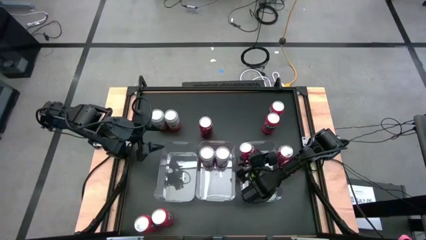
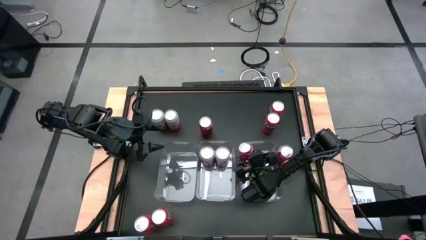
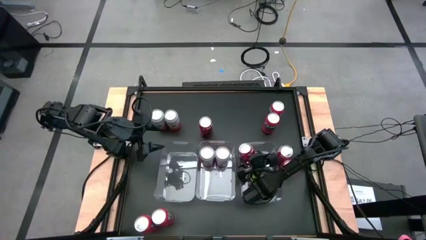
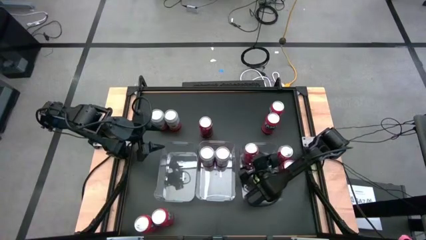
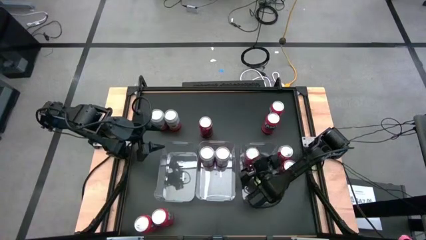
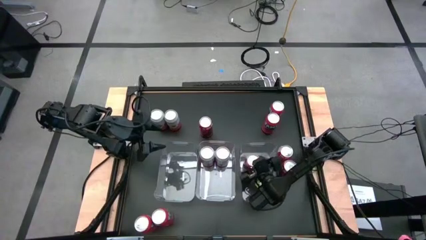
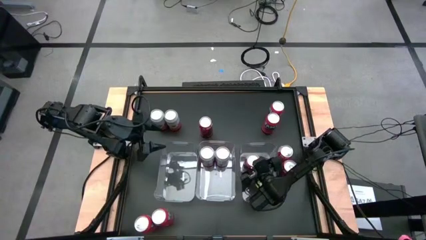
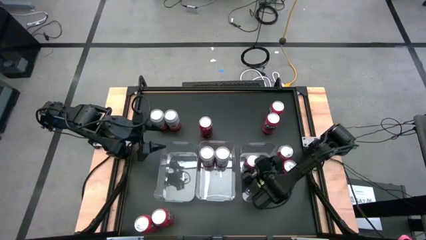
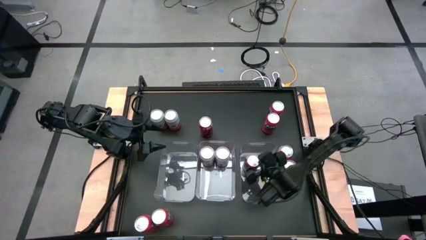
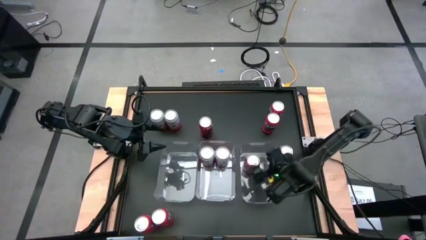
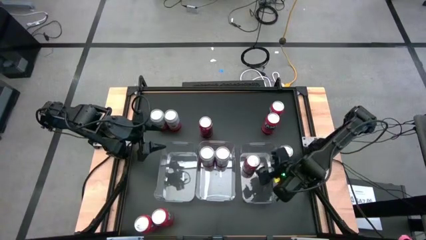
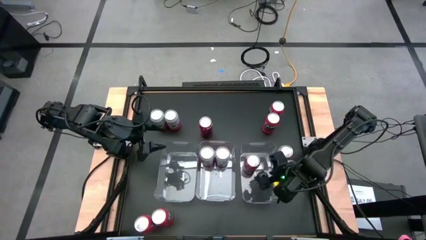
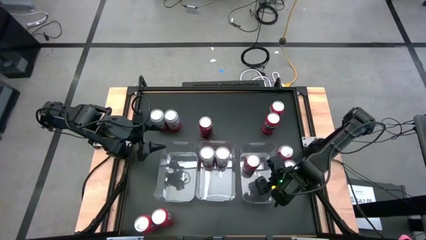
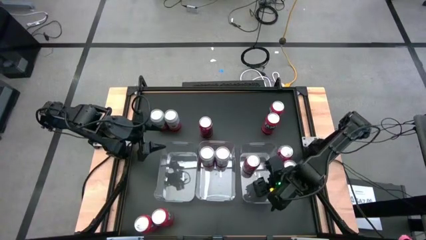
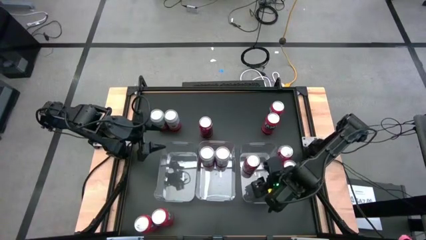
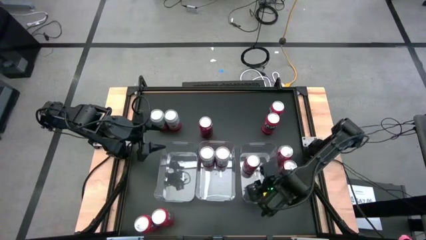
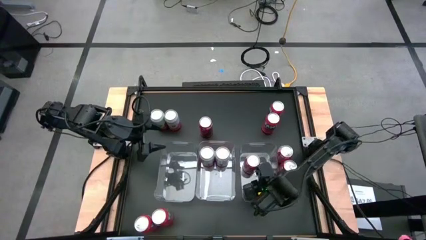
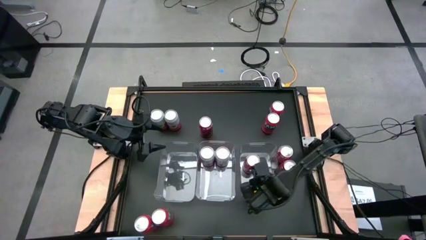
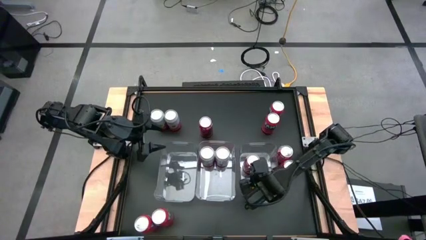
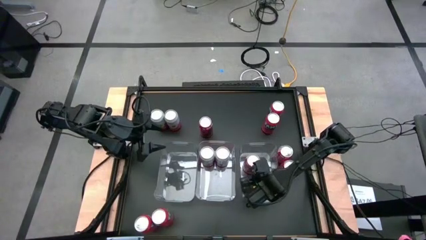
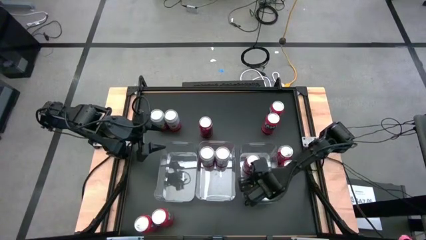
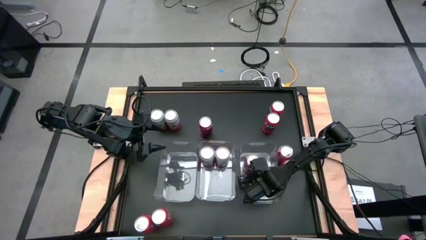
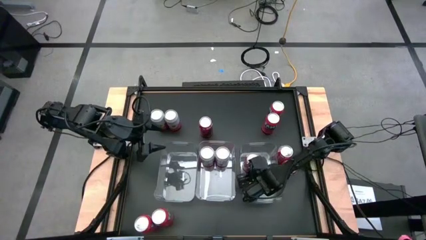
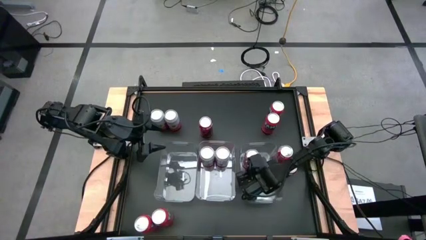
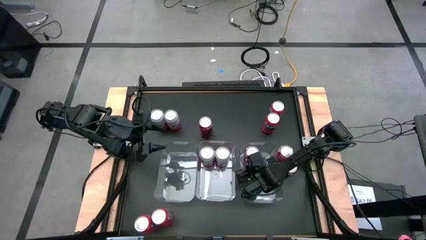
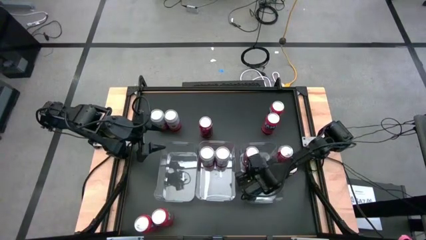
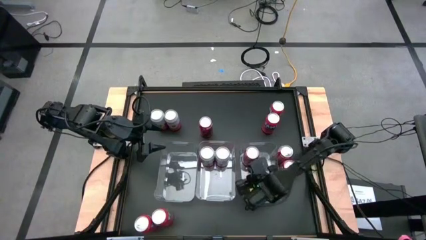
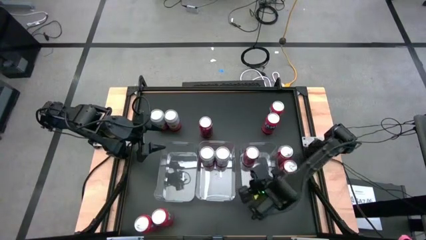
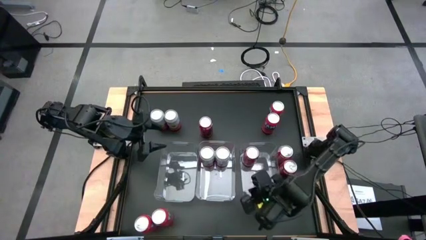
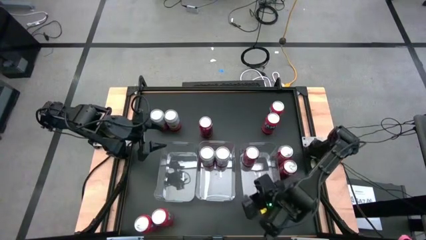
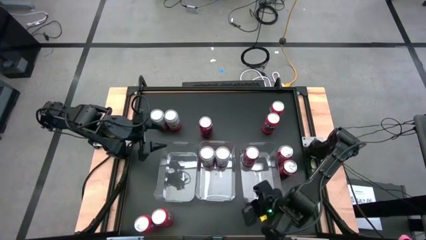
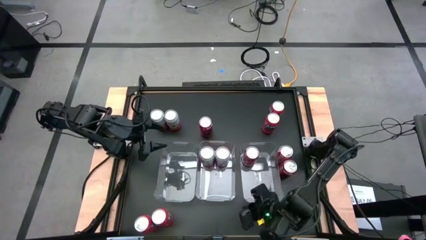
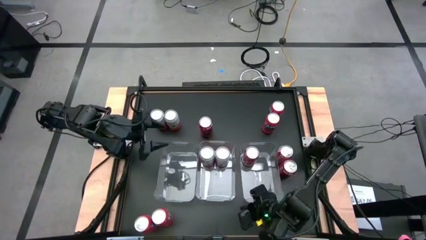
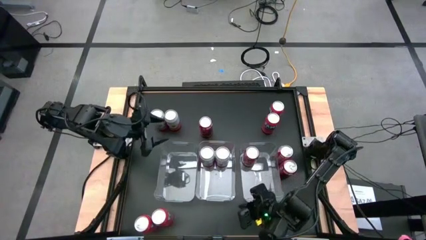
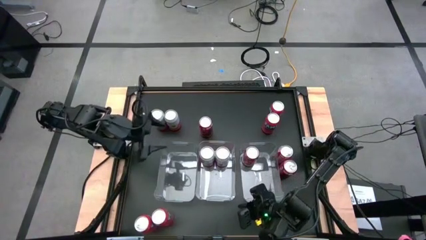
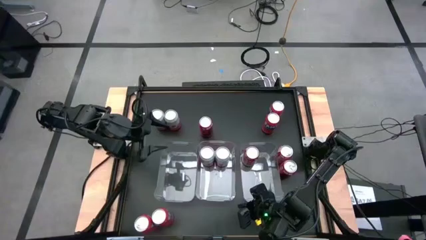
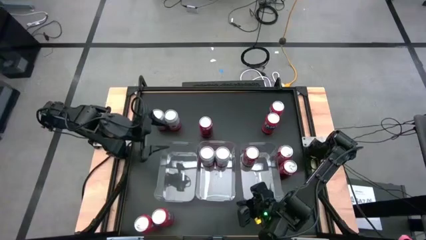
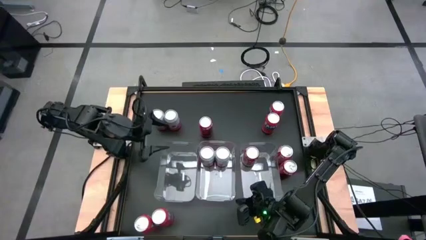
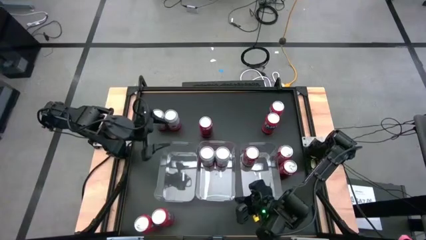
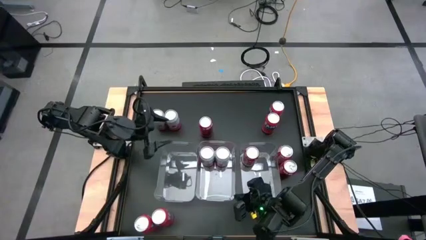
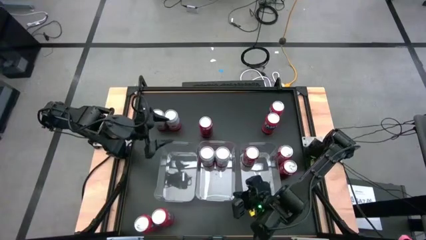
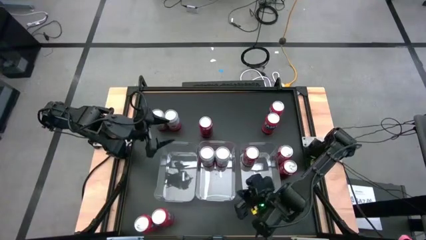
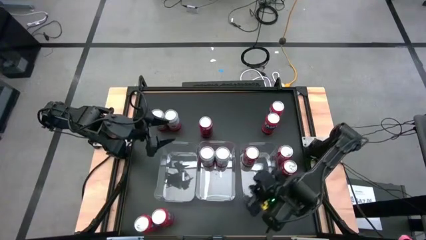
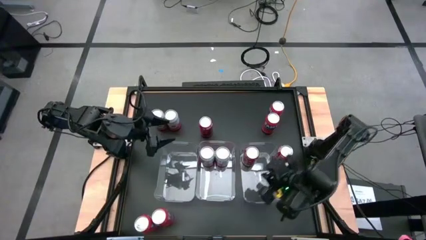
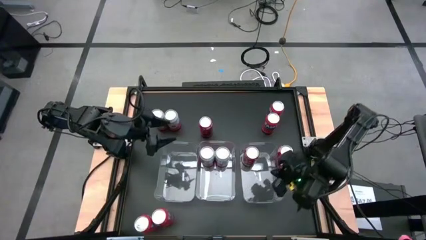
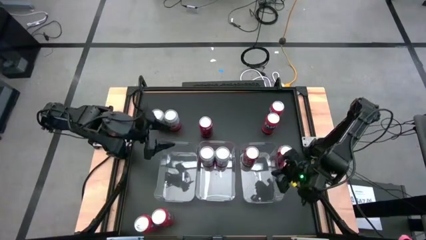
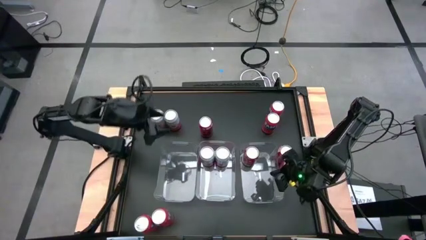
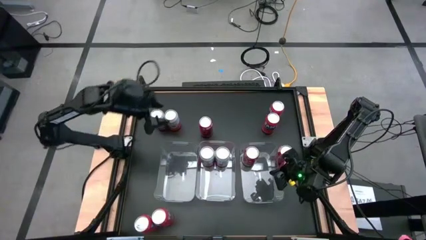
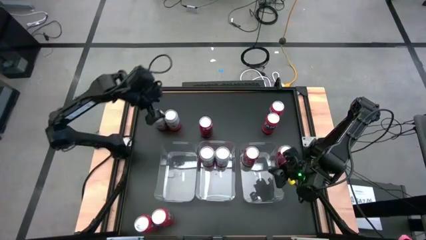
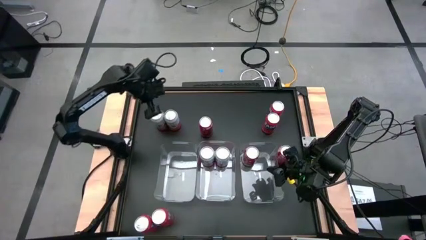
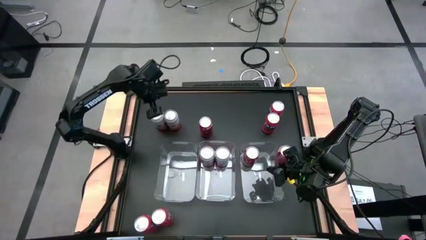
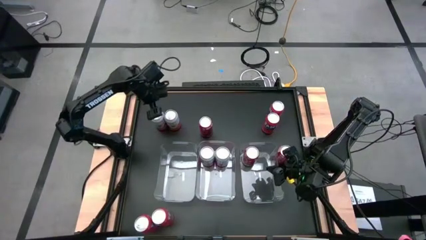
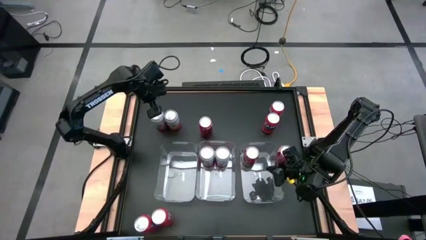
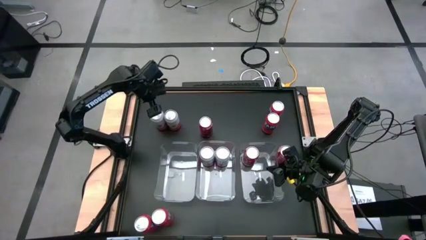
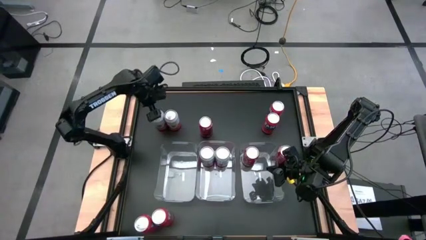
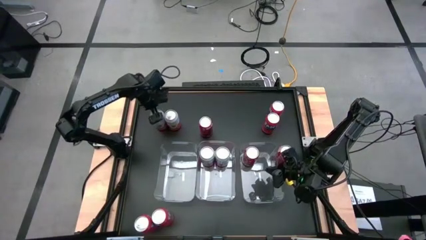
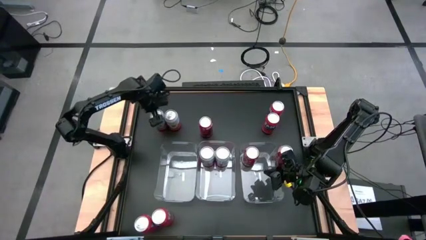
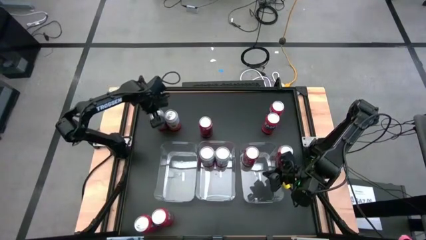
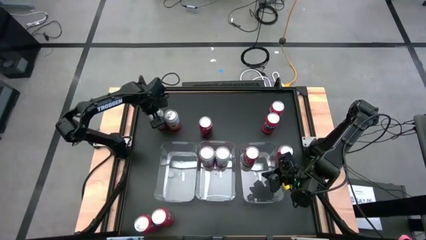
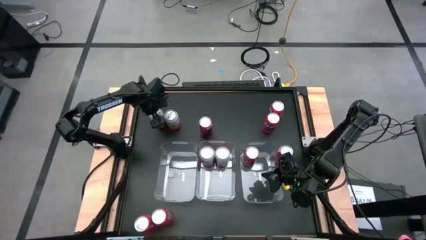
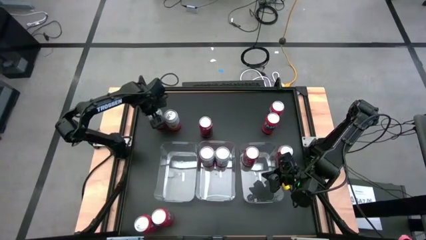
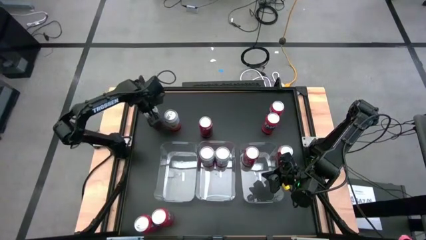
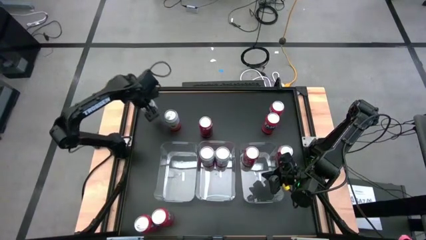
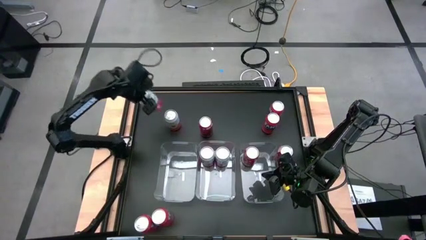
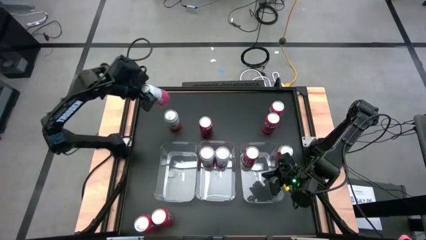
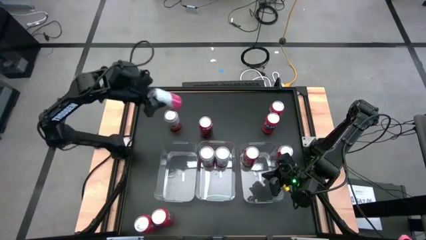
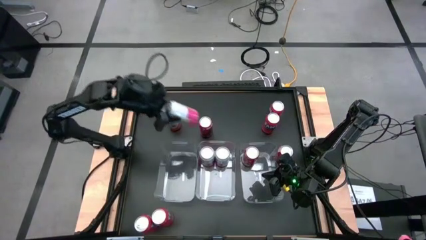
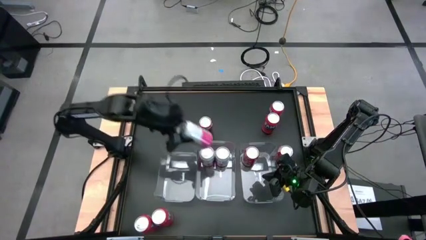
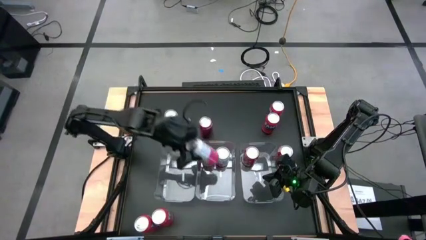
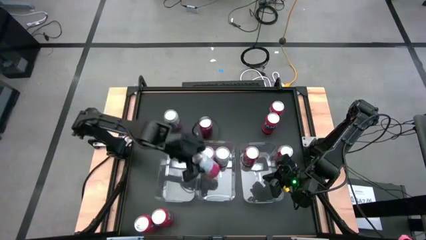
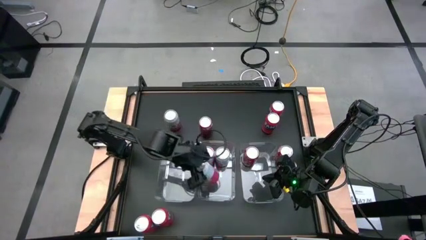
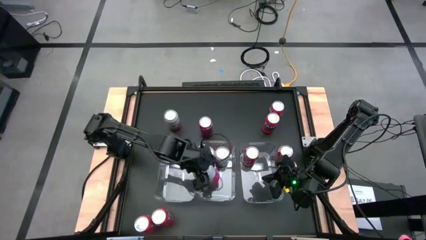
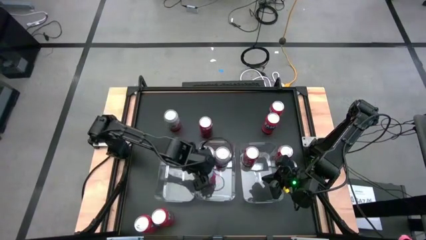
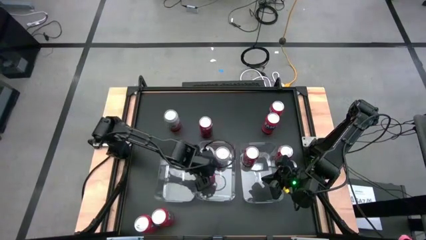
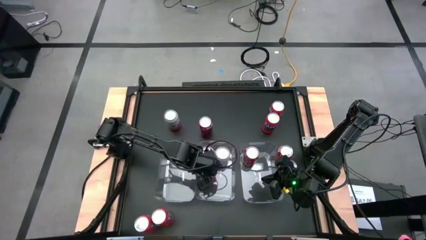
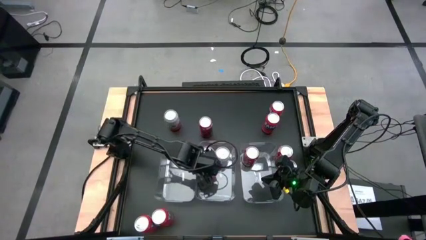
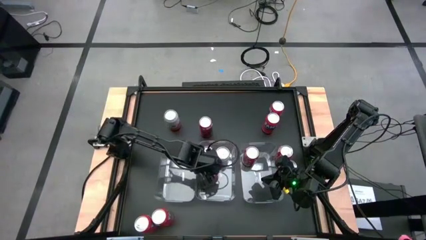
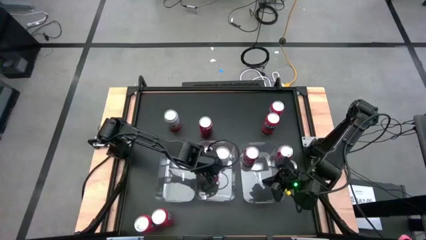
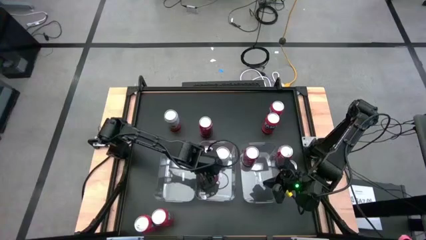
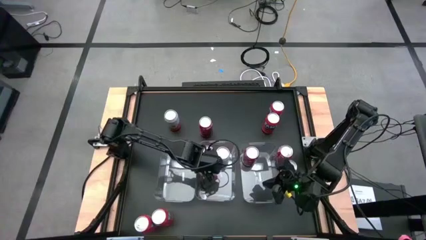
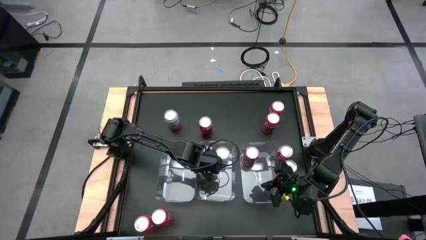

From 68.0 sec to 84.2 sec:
Task: Sort soda cans
Put the pink-white soda can into the center transparent bin
